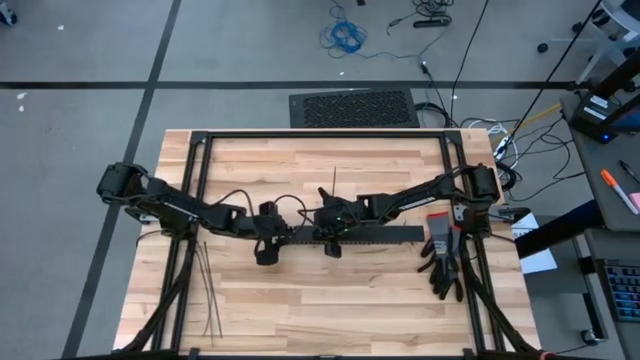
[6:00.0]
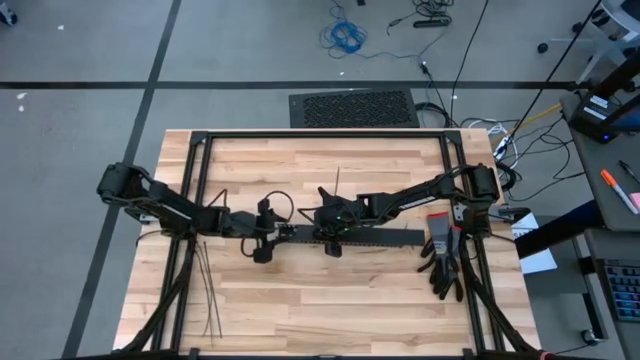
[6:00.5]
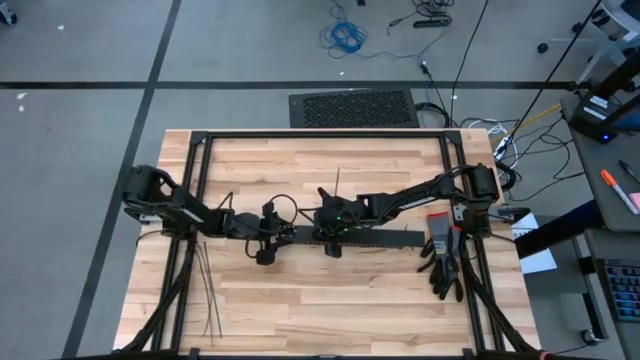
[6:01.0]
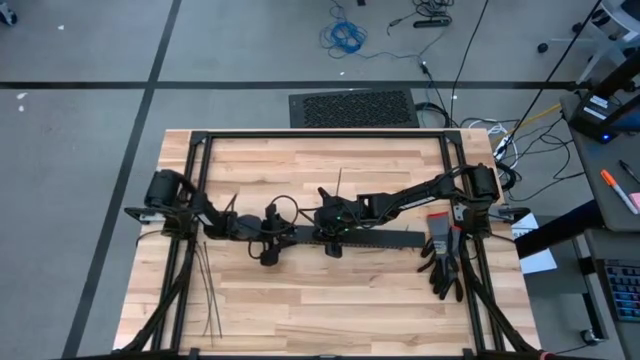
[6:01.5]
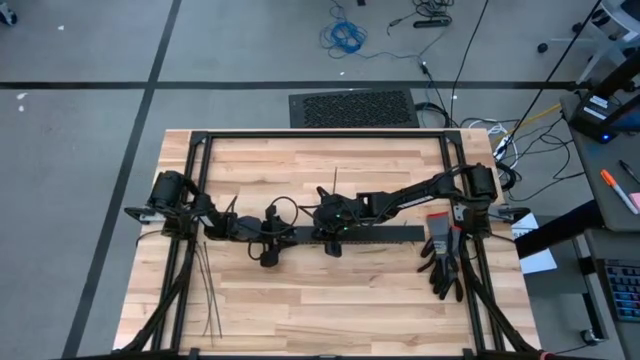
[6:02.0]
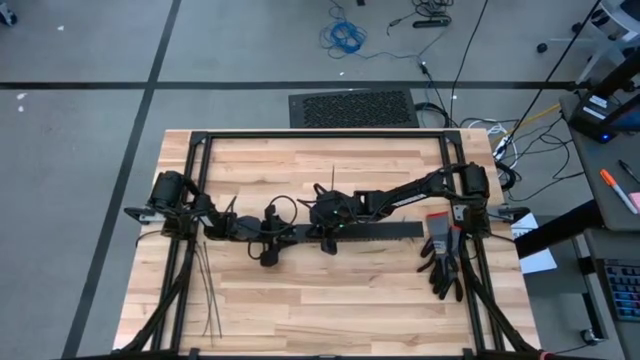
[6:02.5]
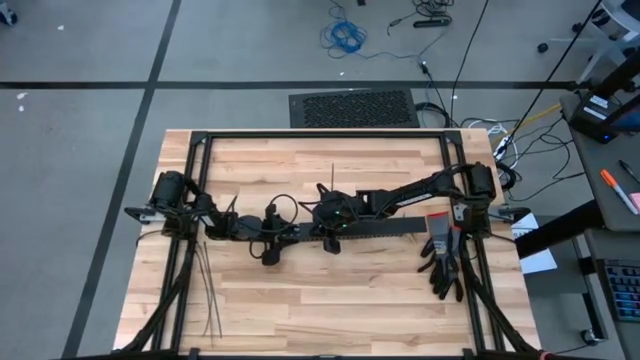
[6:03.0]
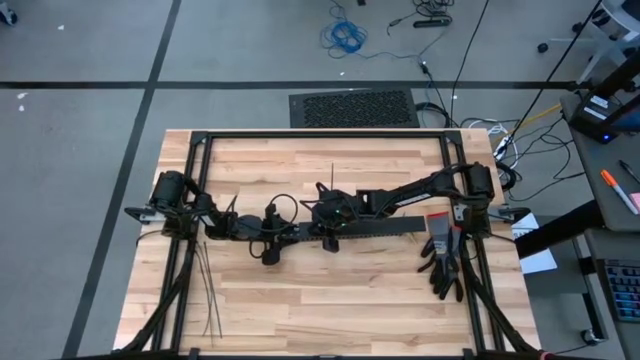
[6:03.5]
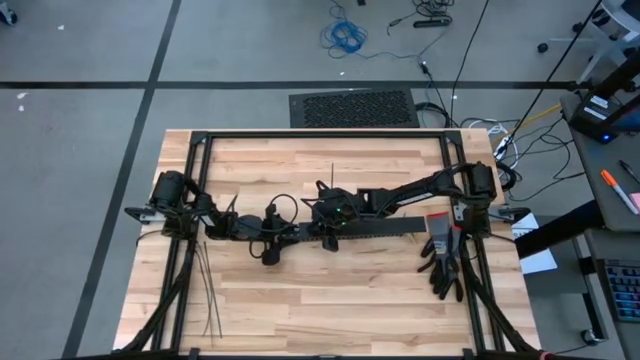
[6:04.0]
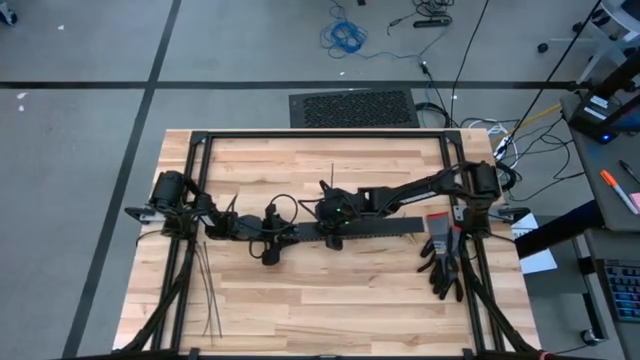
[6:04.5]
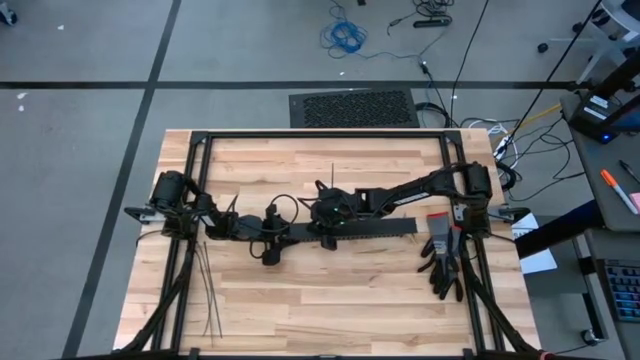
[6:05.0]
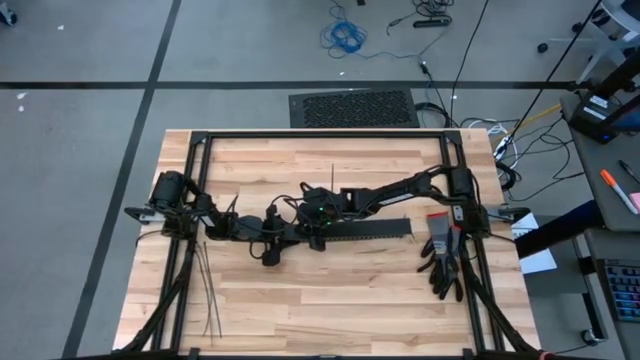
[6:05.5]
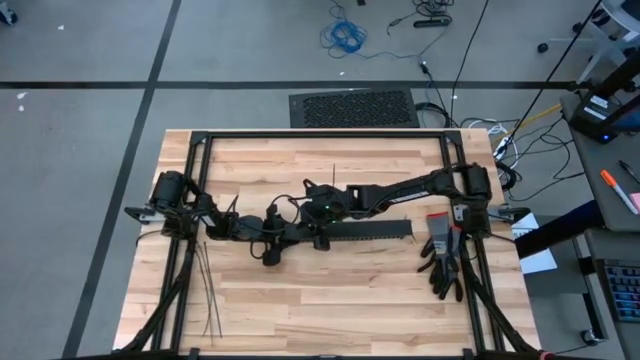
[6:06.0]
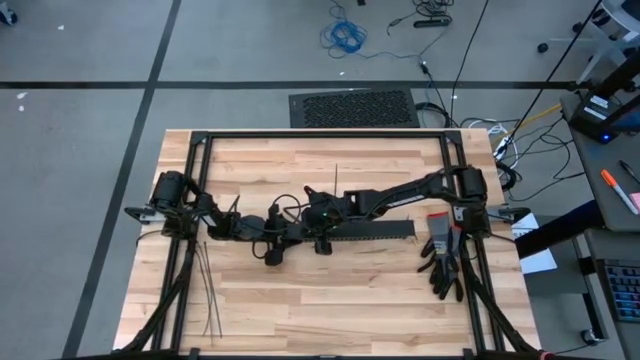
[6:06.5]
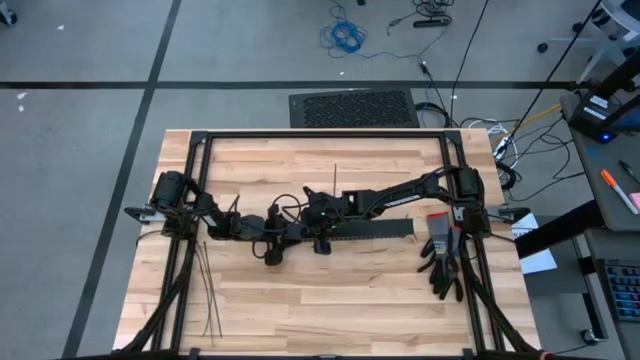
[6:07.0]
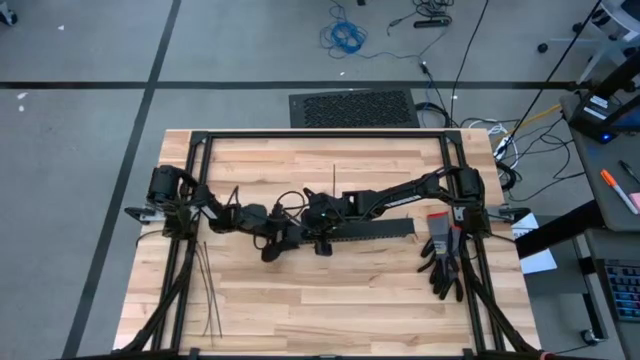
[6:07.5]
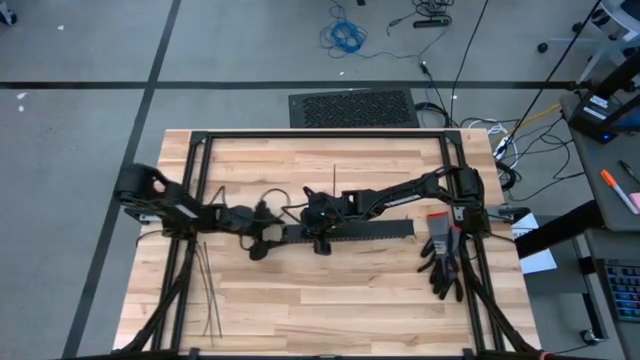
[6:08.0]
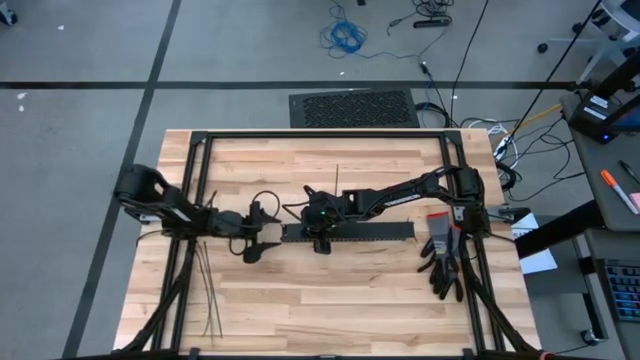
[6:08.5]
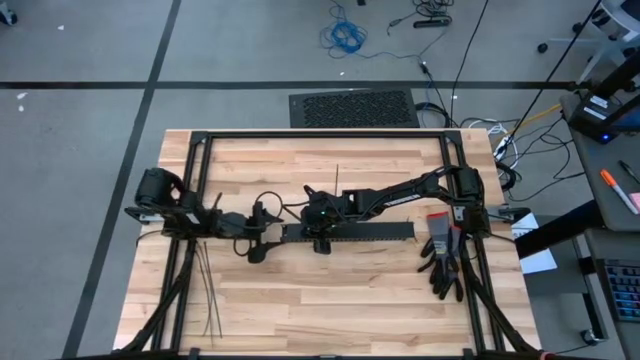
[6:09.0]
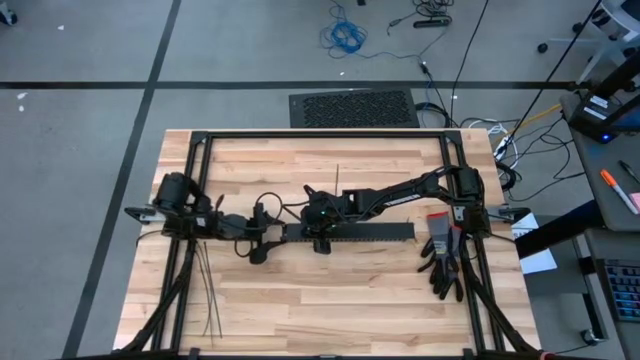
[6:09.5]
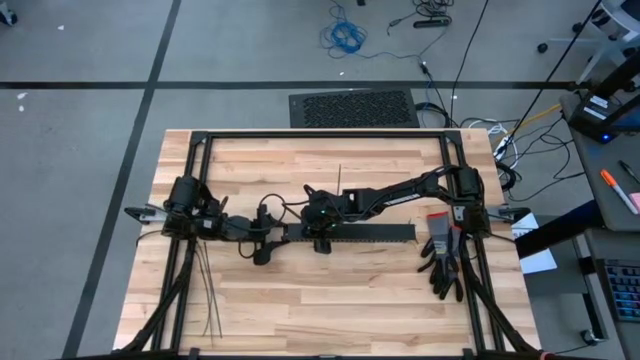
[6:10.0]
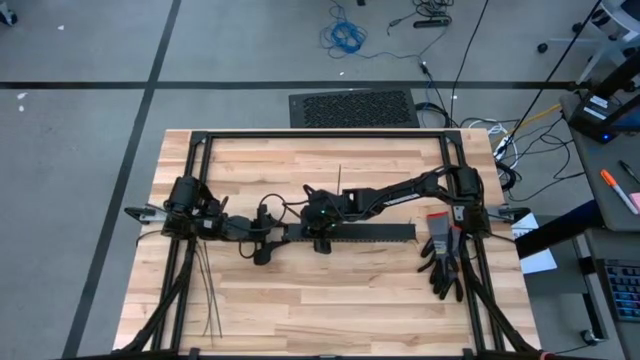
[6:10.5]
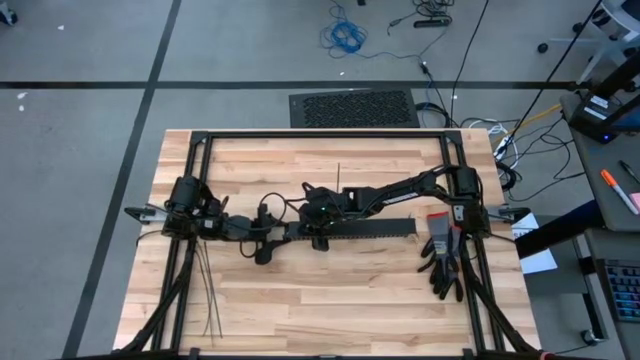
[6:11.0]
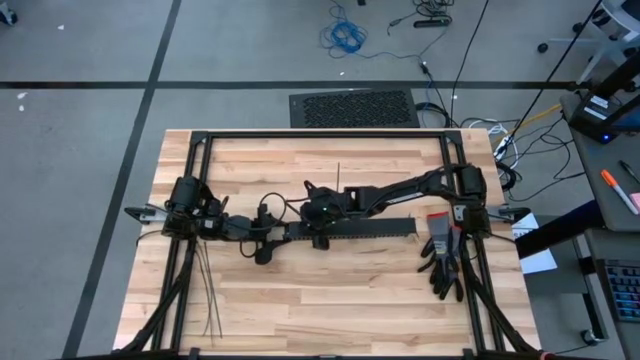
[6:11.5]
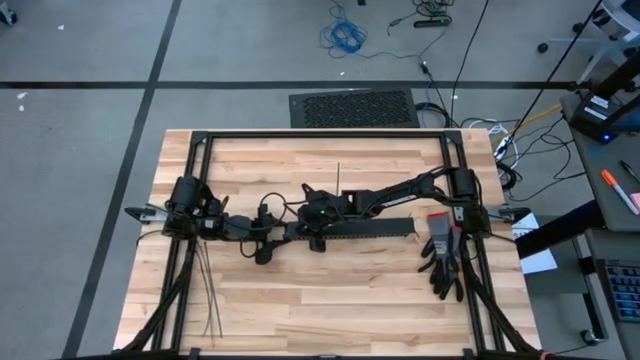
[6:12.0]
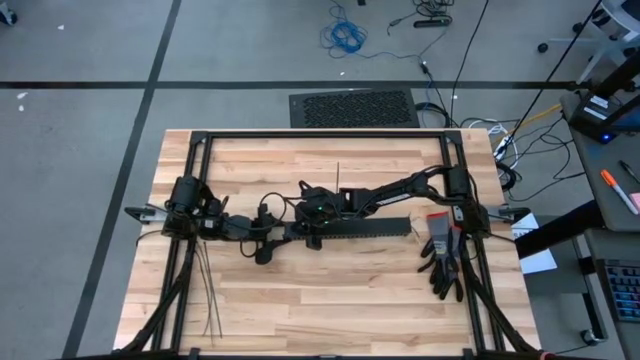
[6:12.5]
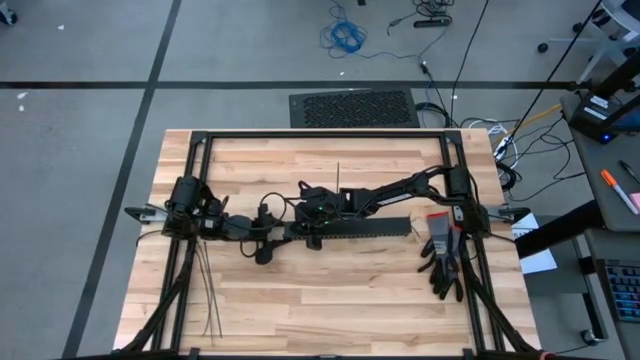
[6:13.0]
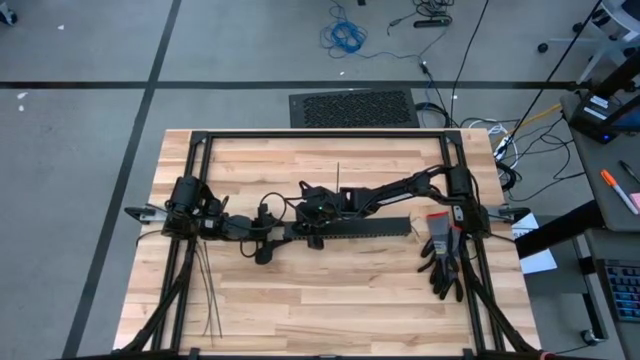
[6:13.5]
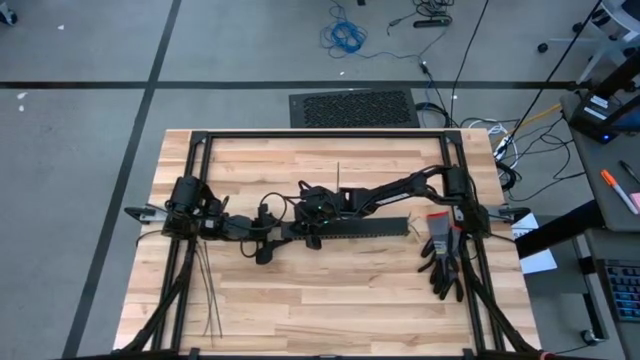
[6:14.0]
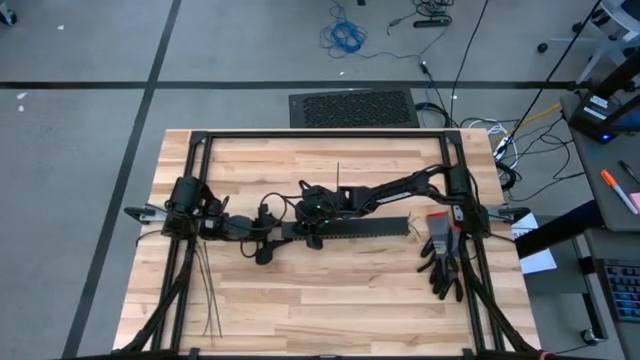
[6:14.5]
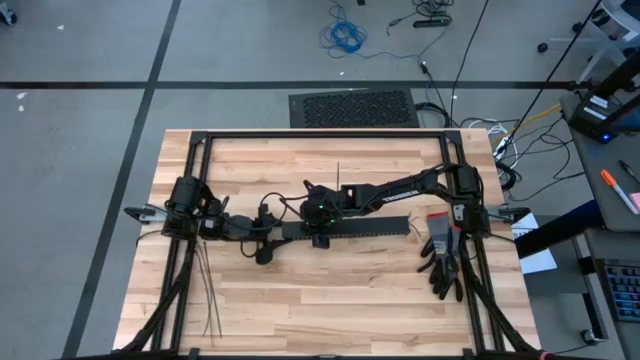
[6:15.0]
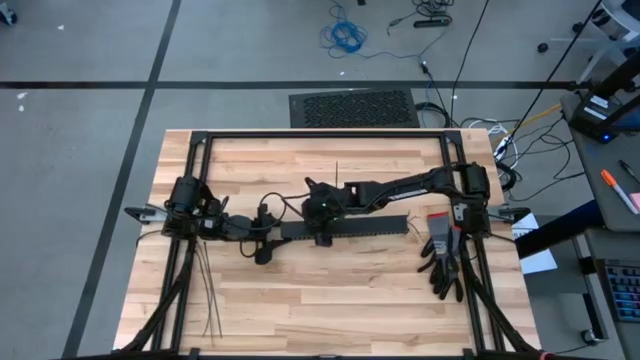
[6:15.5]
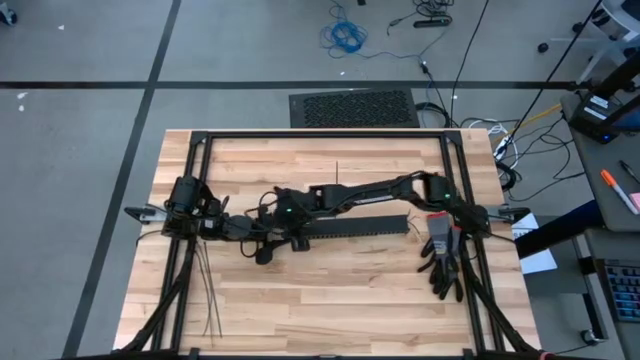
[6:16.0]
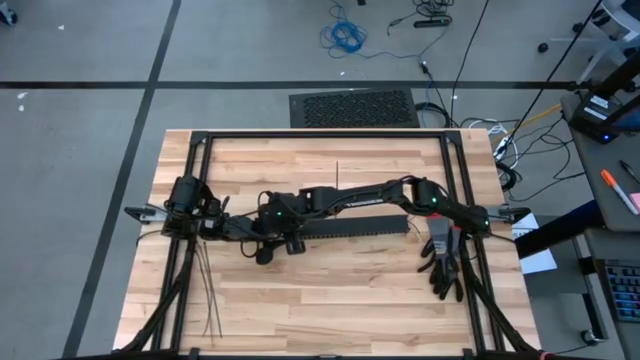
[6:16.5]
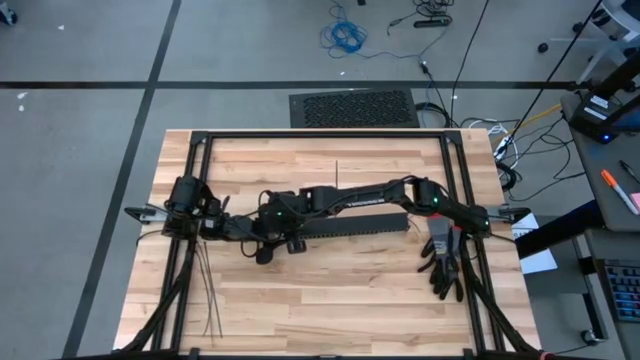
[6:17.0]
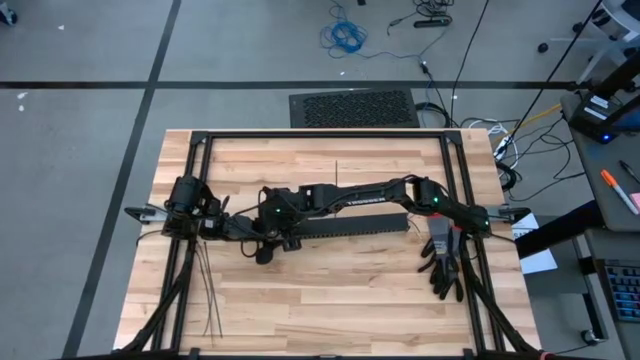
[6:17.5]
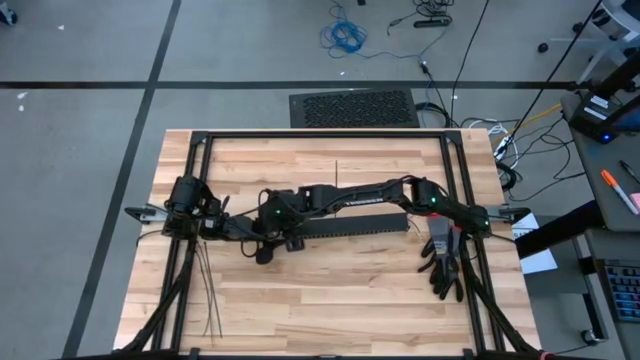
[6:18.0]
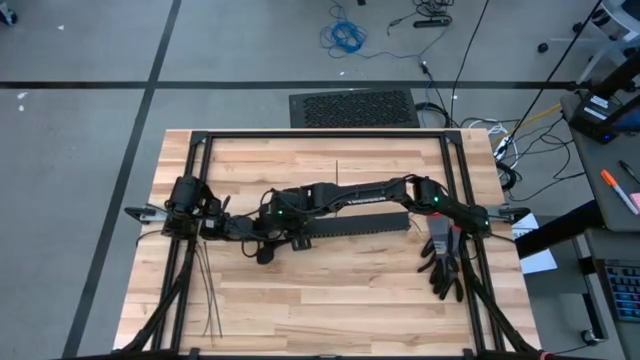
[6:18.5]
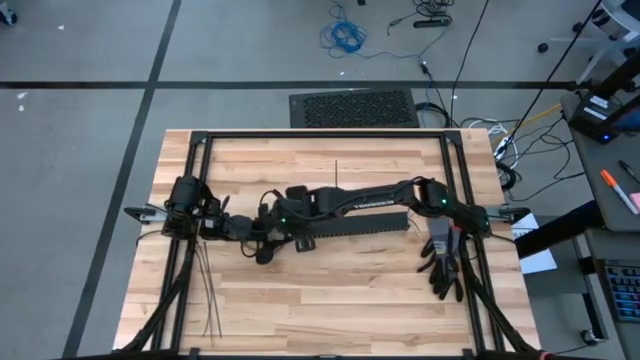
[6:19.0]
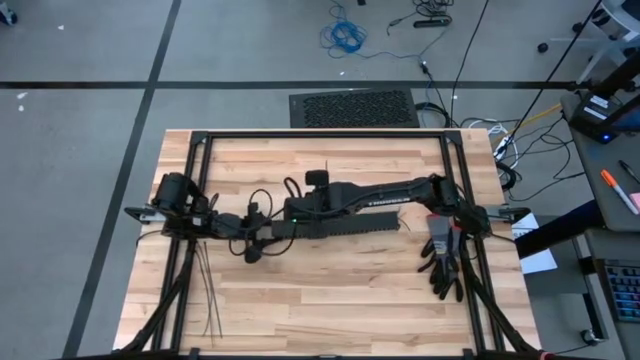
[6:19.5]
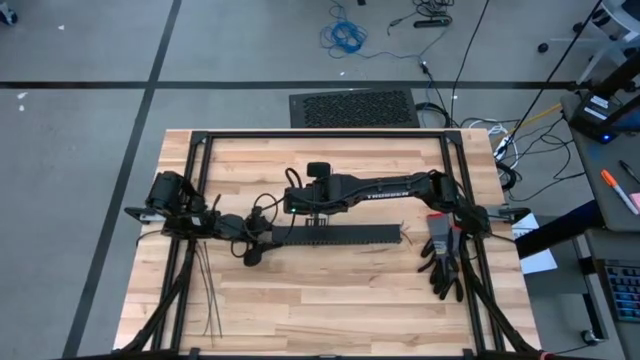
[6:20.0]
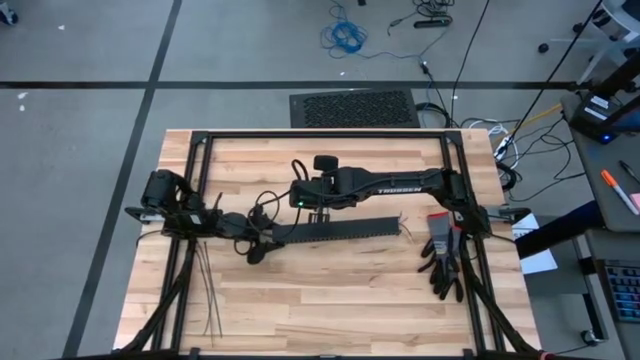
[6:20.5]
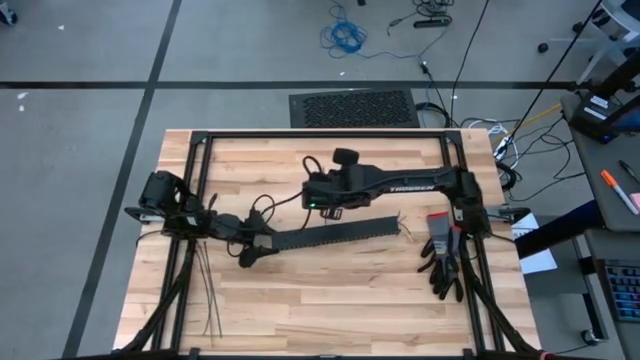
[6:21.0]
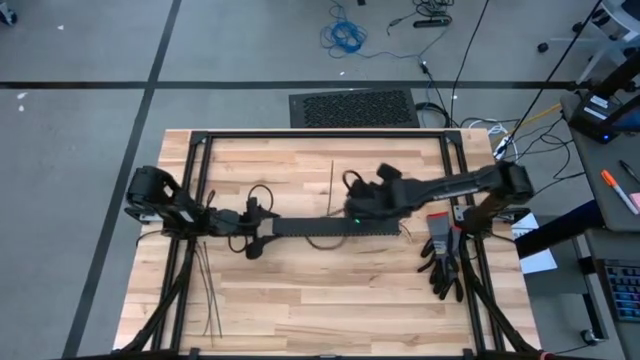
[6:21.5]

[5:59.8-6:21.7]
Task: Ziptie cables
Close the black cable duct
